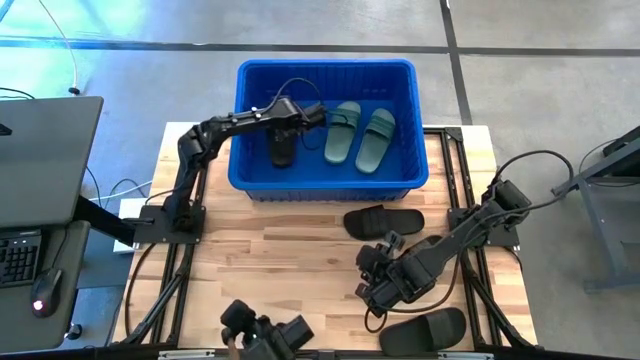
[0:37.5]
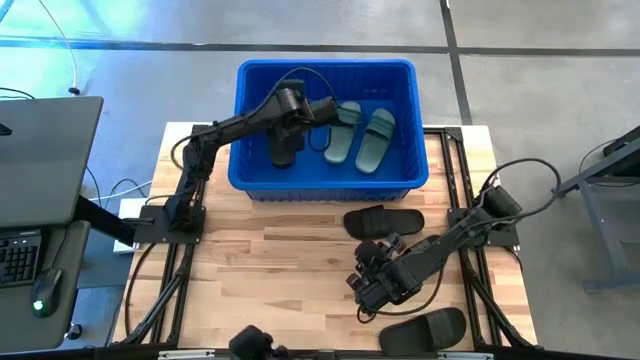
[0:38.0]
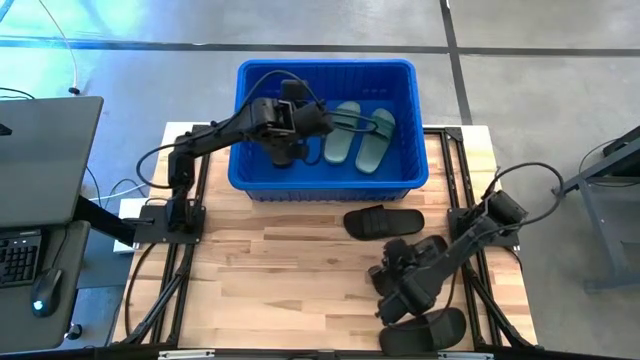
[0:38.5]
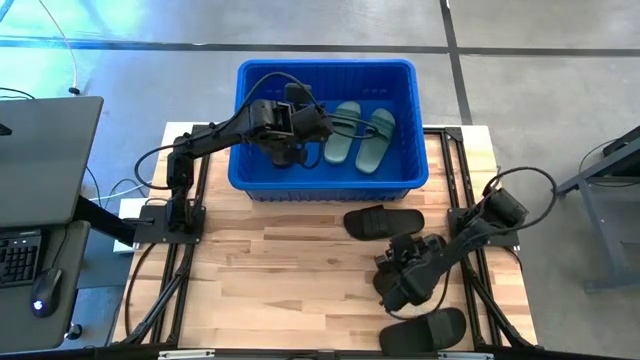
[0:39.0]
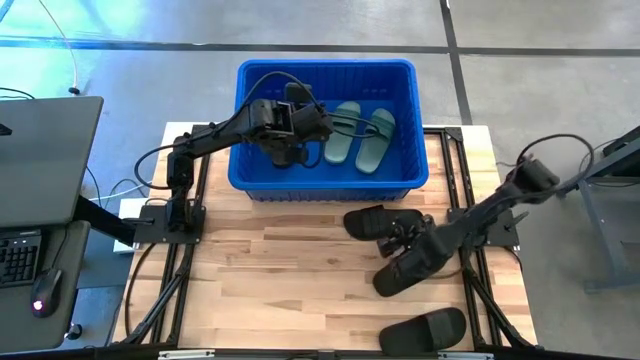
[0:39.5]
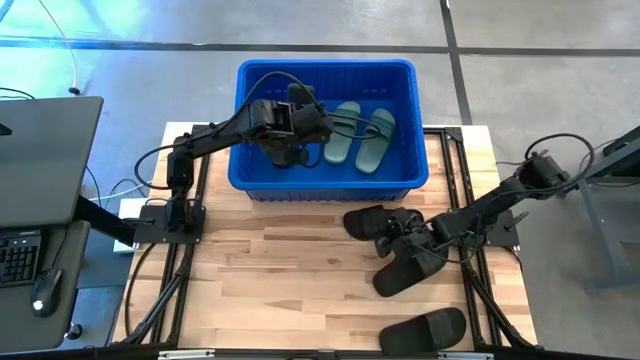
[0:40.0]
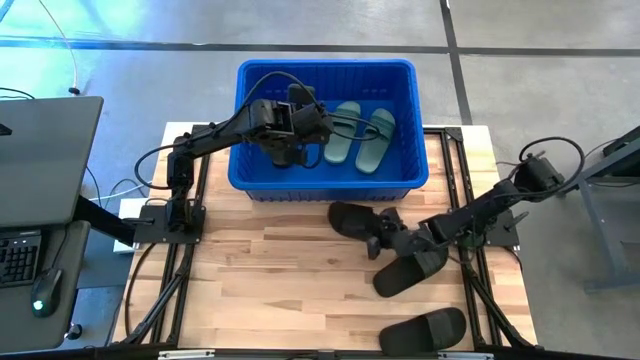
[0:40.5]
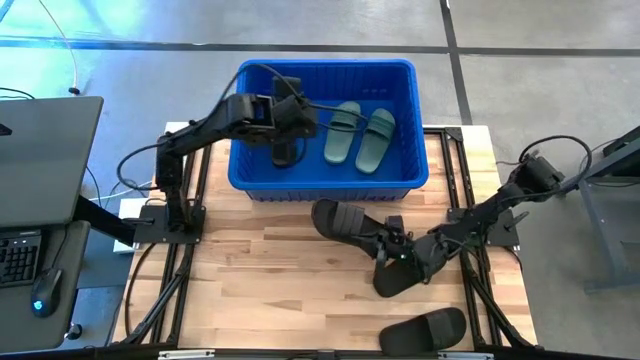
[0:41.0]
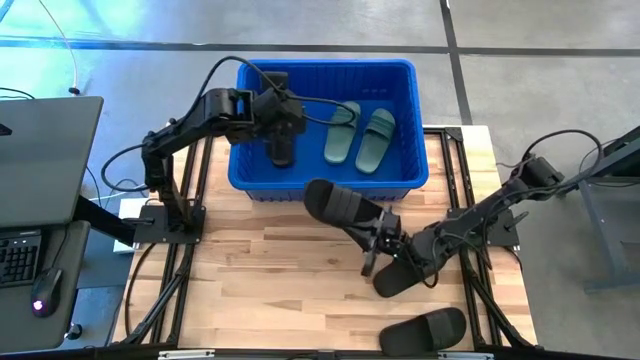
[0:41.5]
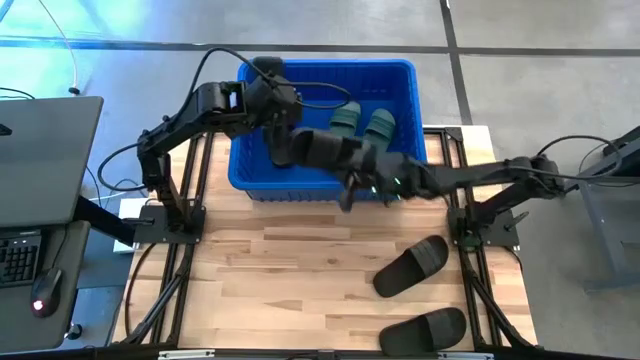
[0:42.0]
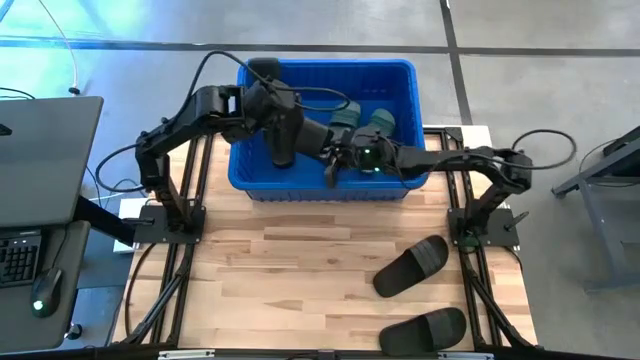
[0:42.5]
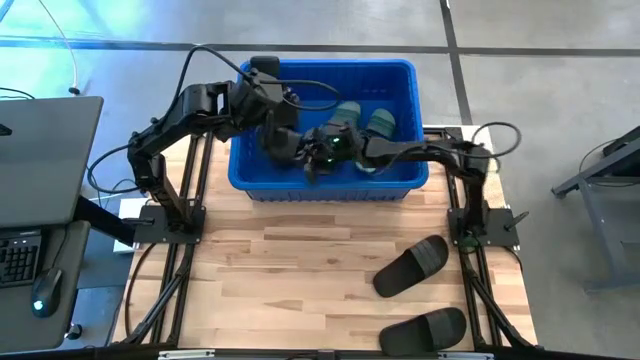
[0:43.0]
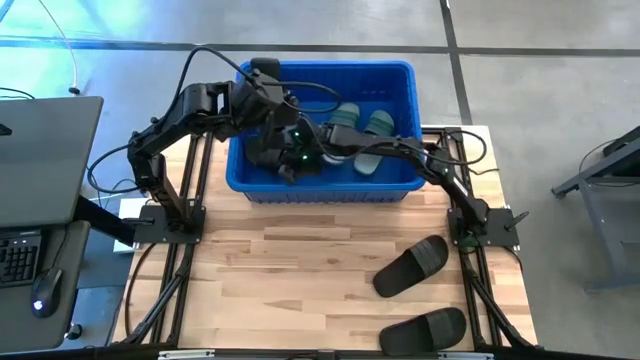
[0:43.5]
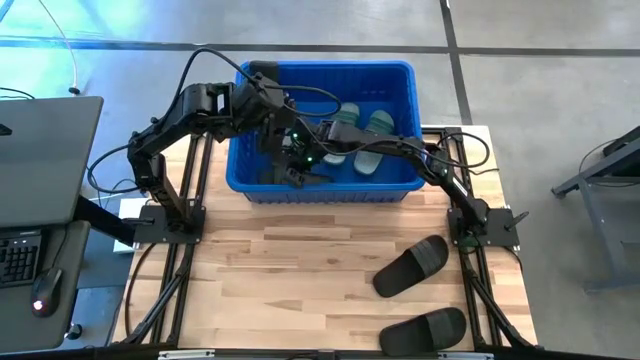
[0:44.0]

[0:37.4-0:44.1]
Task: Pick and place slides into bin
Put the black slide into the blue bin

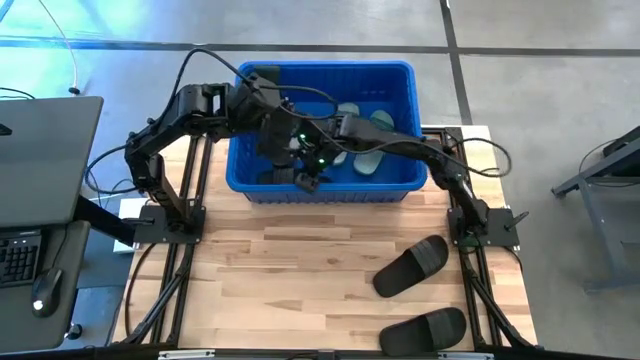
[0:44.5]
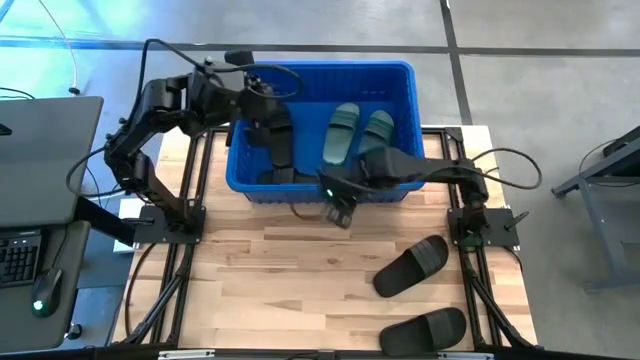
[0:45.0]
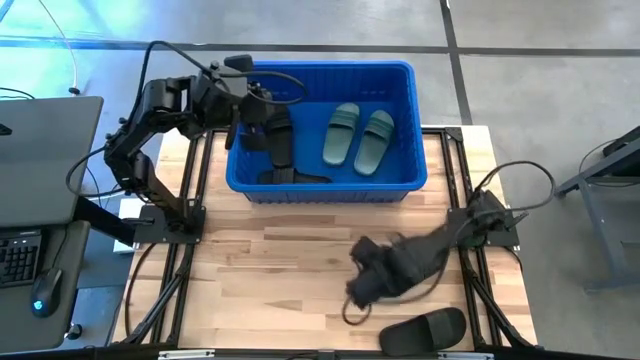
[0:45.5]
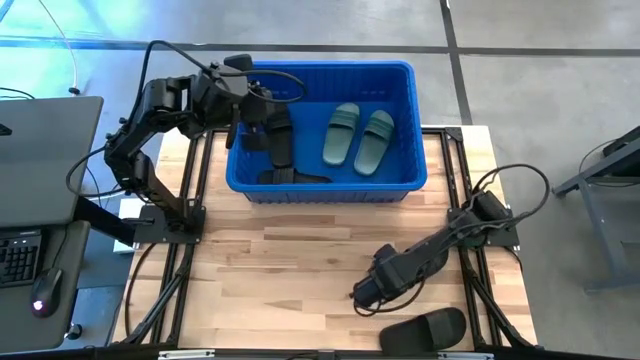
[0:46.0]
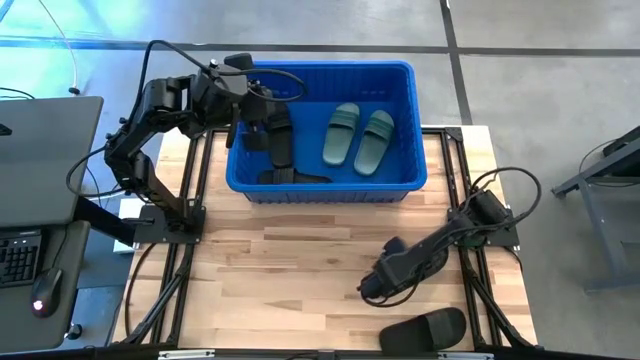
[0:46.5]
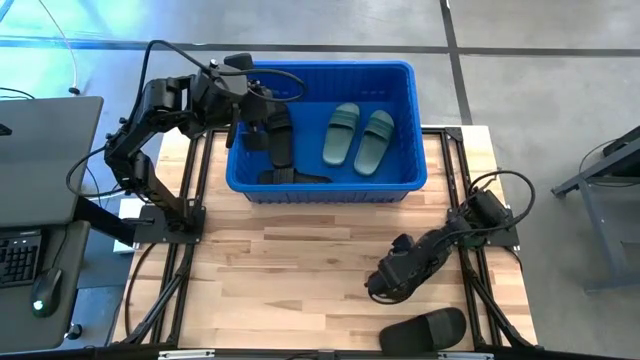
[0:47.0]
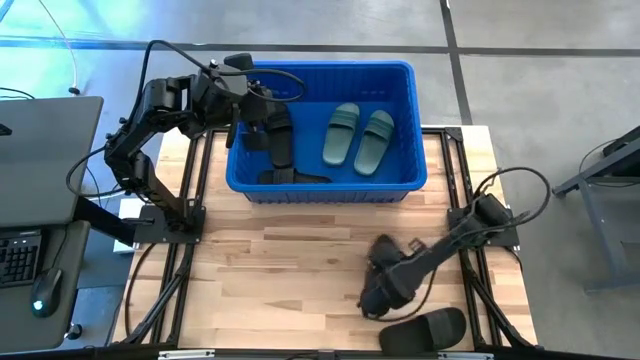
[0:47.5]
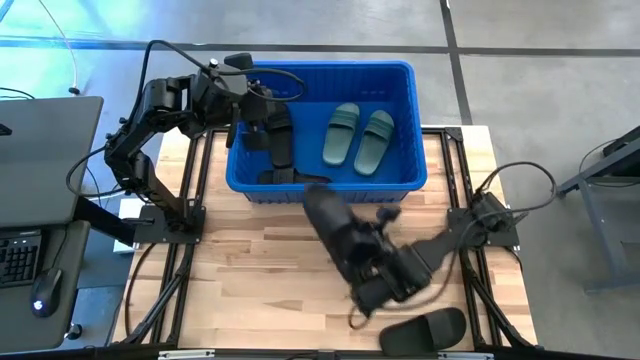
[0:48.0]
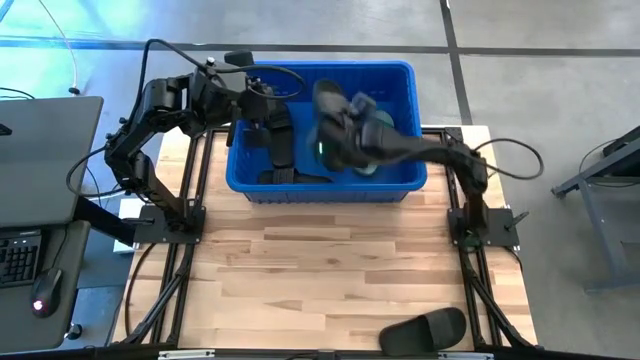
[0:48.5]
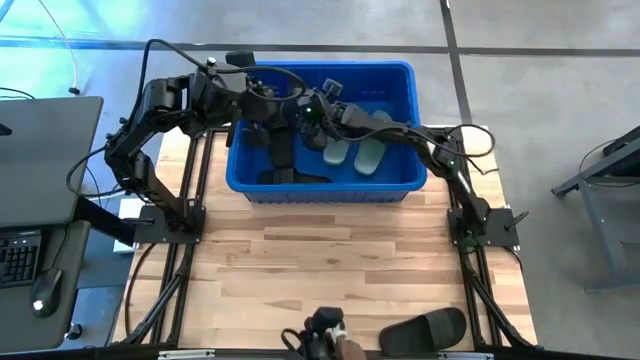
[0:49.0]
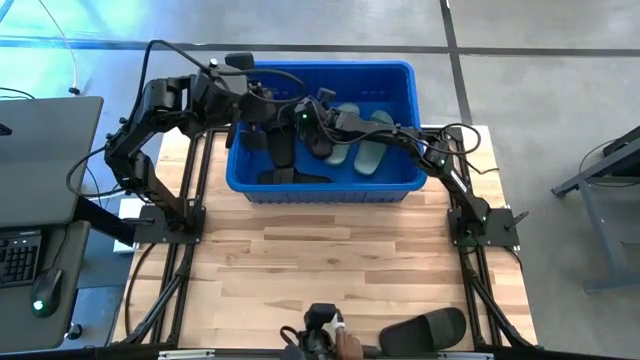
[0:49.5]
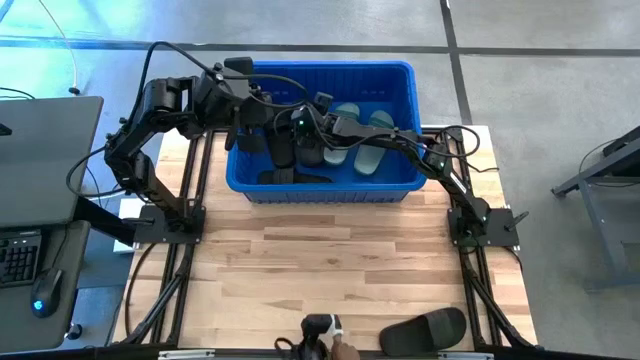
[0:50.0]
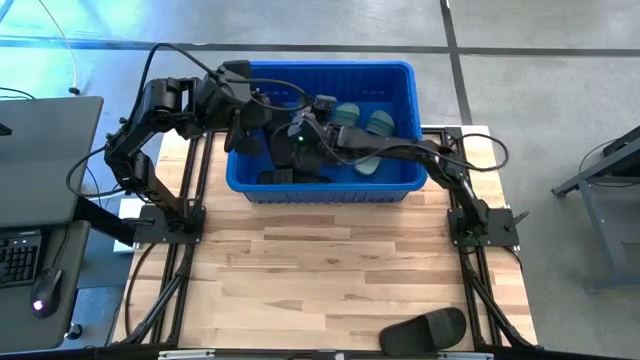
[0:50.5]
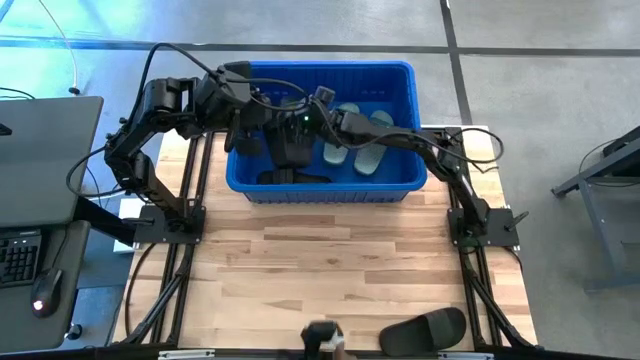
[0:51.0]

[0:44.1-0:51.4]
Put the black slide into the blue bin

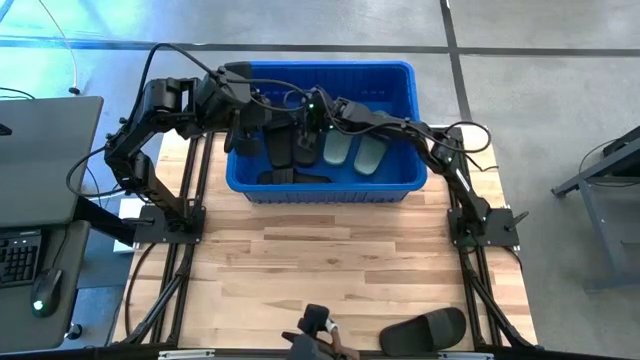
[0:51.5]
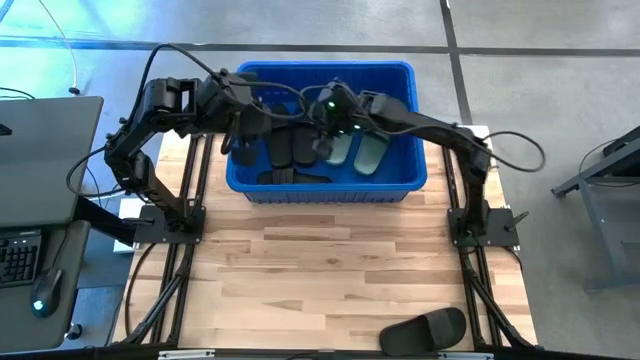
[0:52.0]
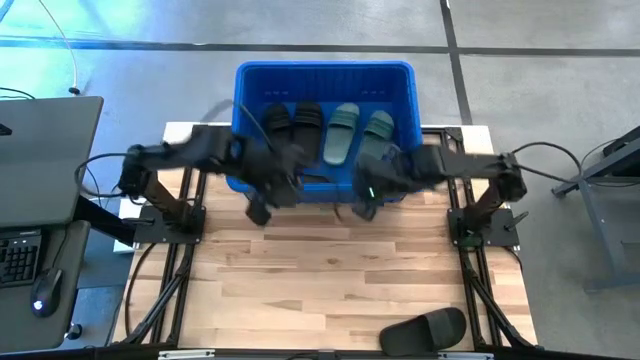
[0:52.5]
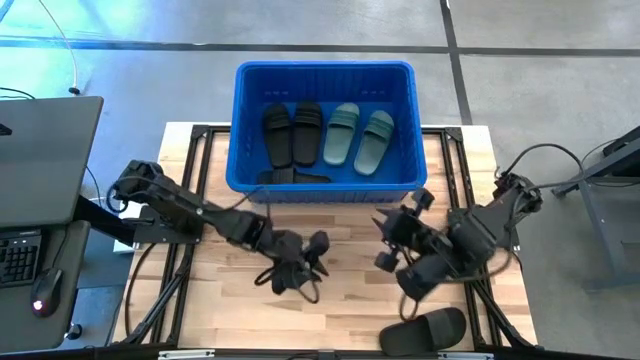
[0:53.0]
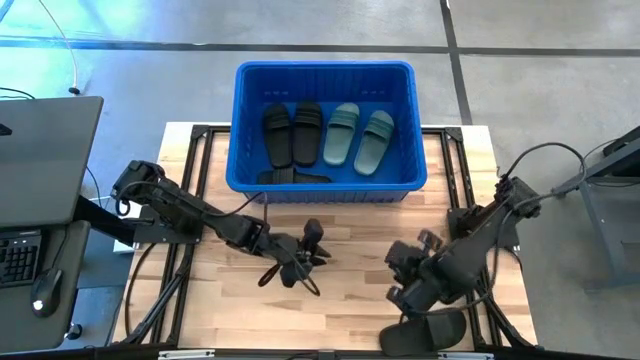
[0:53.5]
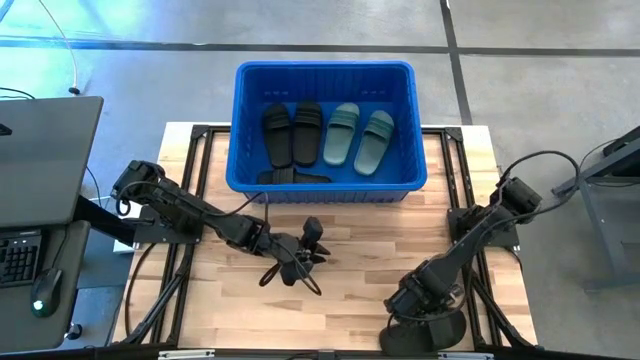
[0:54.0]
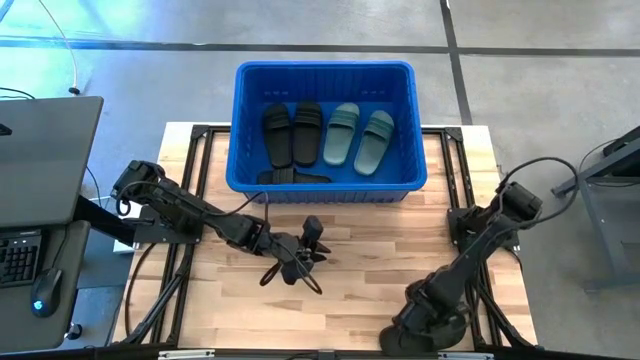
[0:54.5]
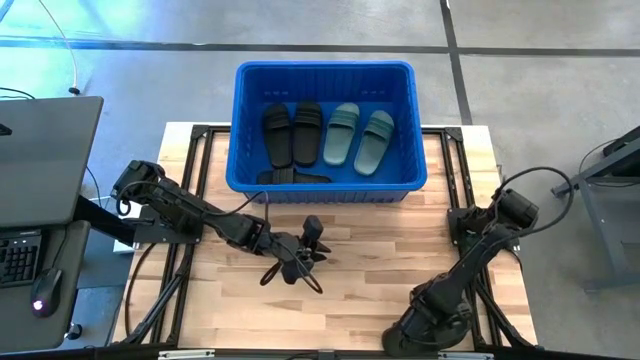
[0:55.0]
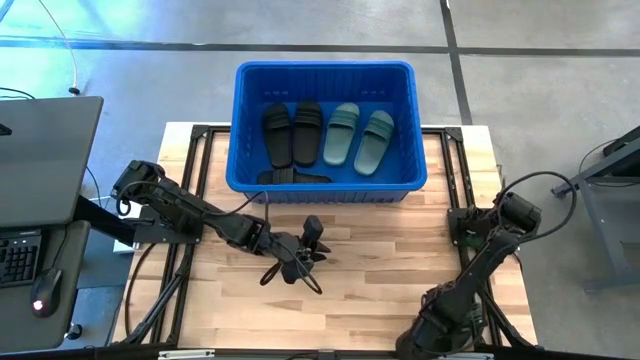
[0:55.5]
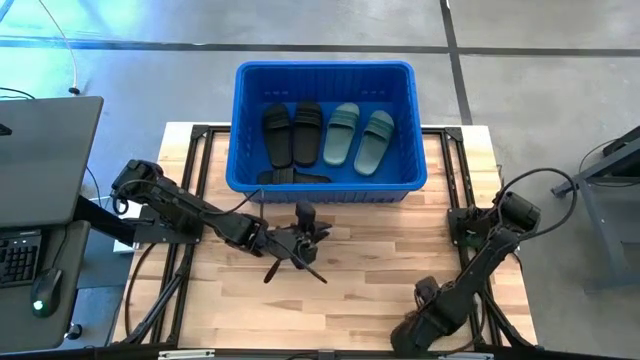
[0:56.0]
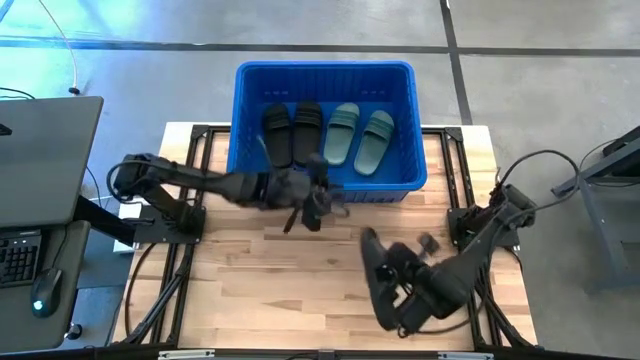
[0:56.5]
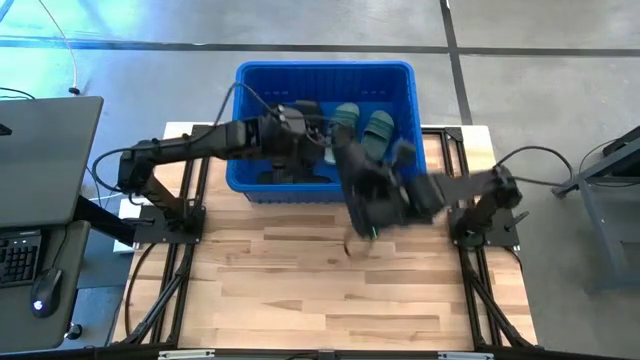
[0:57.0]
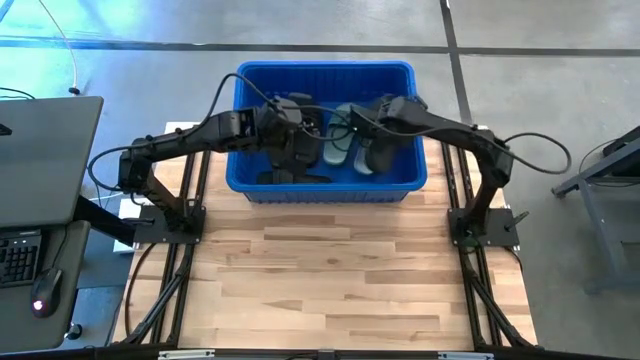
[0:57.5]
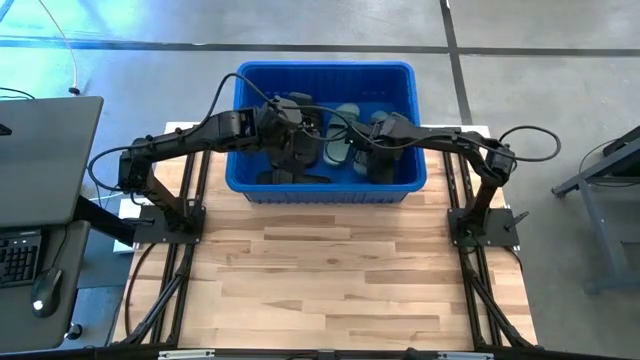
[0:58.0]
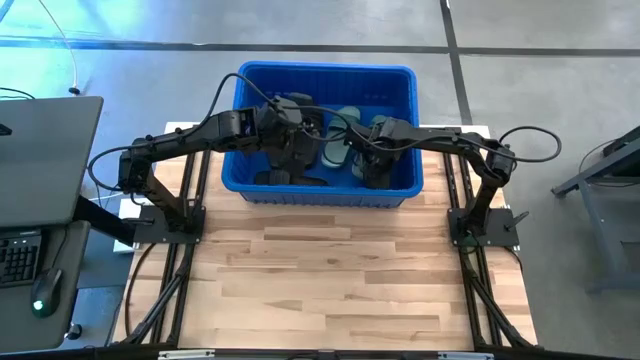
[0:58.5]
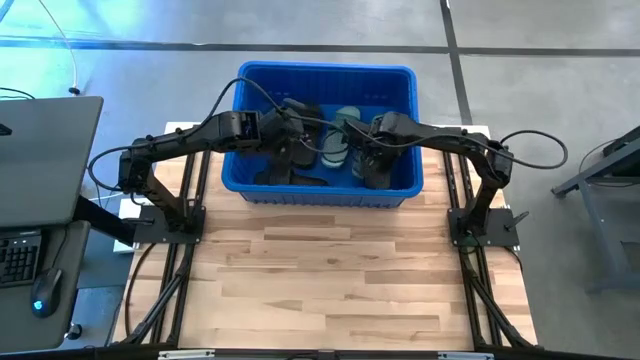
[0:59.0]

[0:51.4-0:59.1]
Put the black slide into the blue bin
